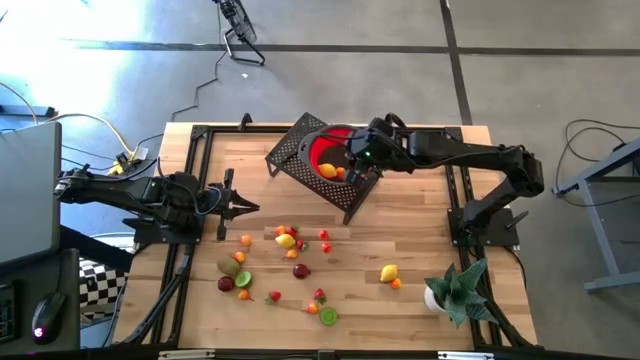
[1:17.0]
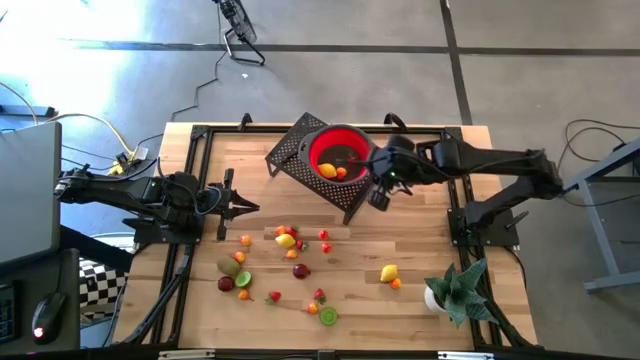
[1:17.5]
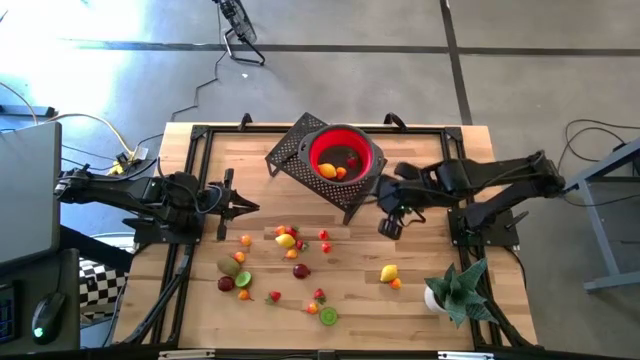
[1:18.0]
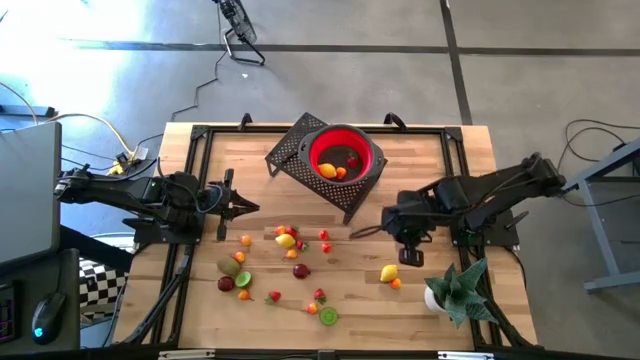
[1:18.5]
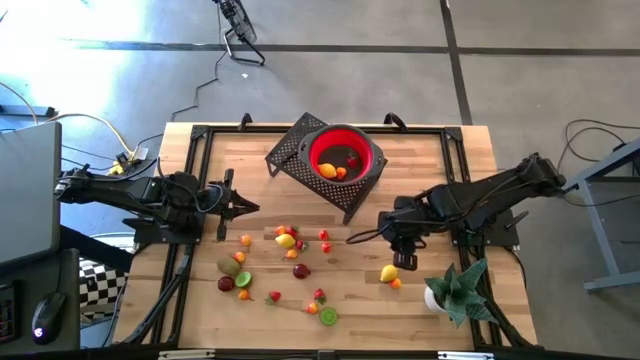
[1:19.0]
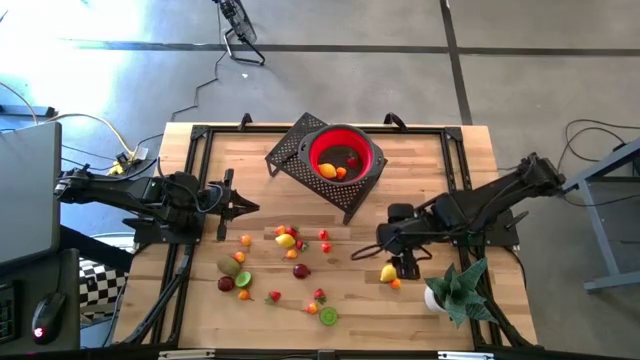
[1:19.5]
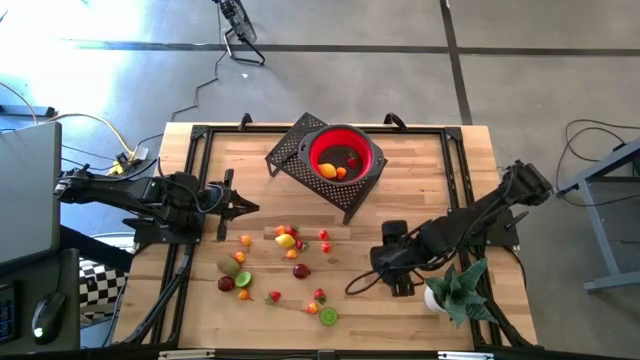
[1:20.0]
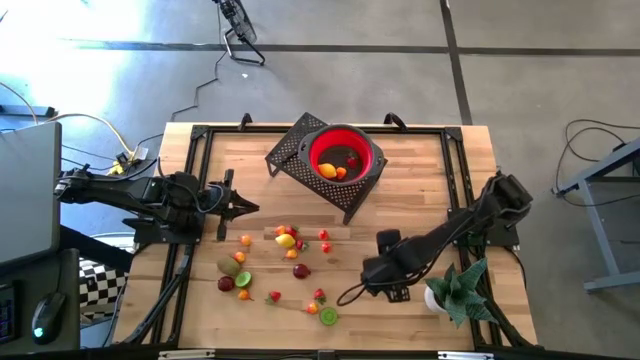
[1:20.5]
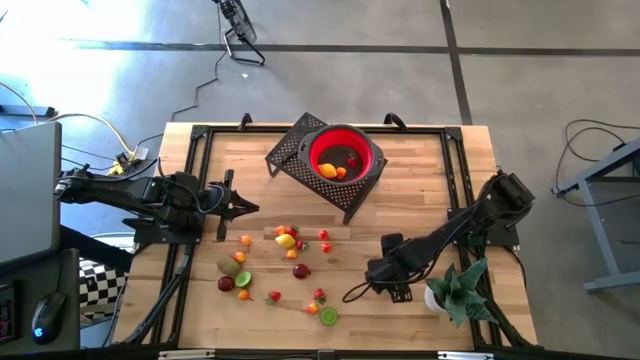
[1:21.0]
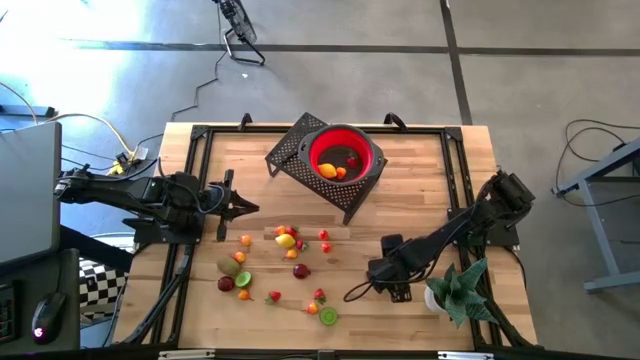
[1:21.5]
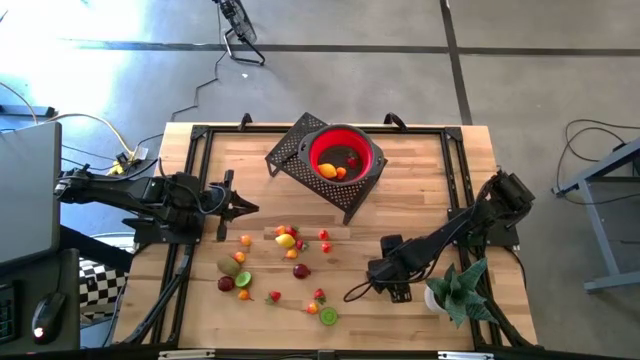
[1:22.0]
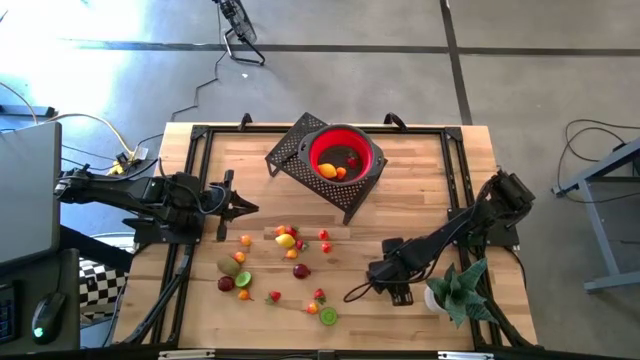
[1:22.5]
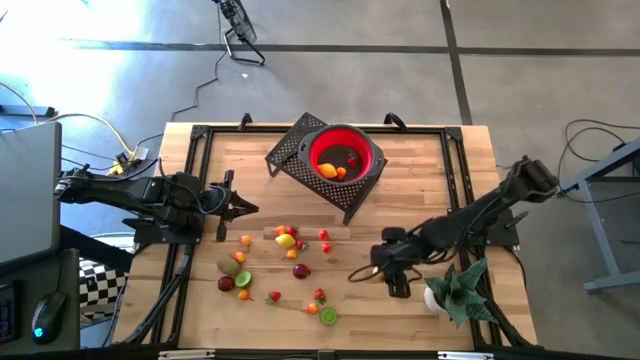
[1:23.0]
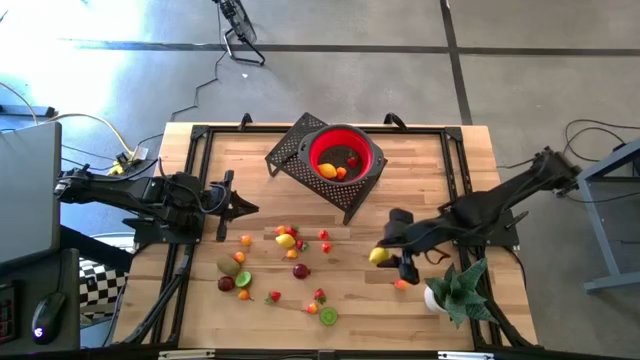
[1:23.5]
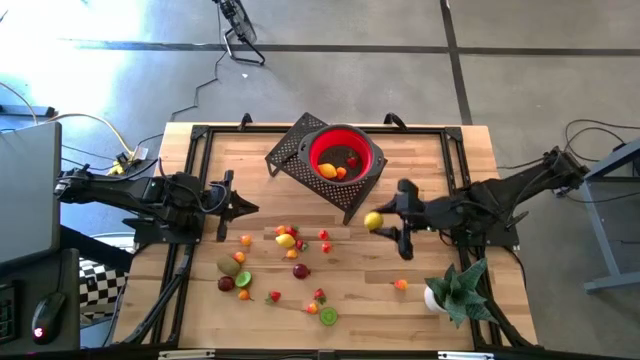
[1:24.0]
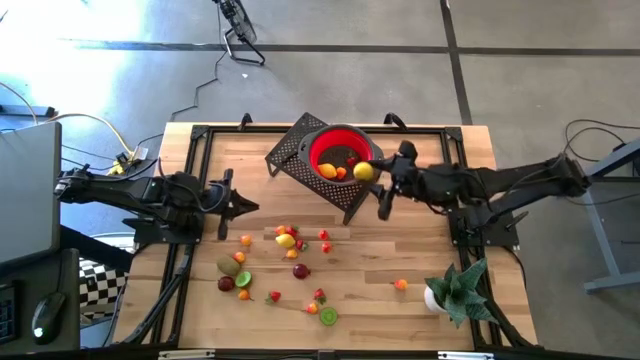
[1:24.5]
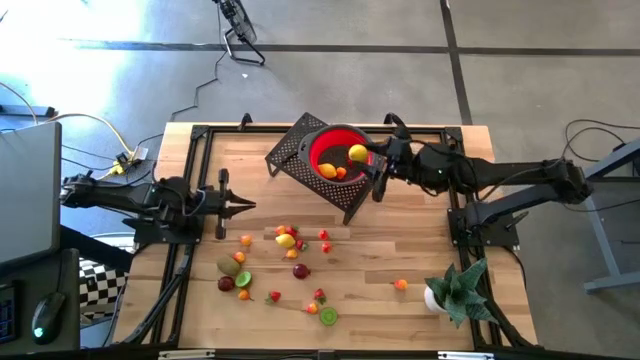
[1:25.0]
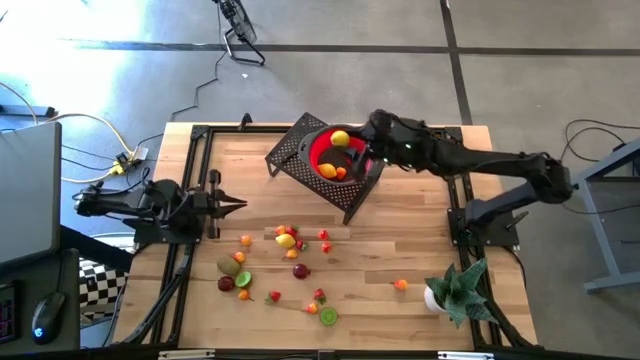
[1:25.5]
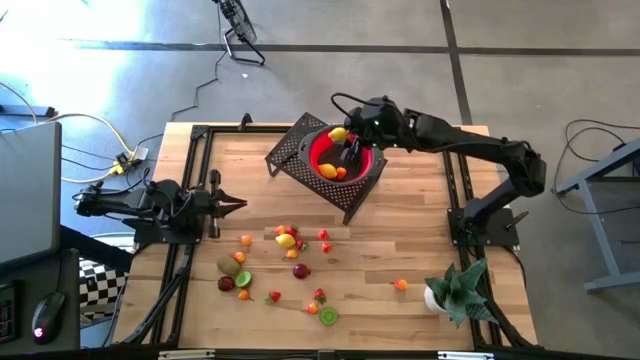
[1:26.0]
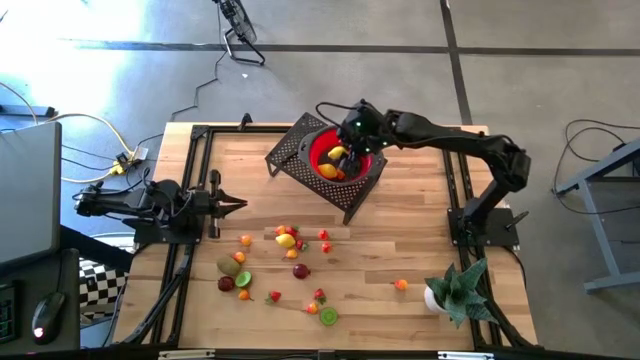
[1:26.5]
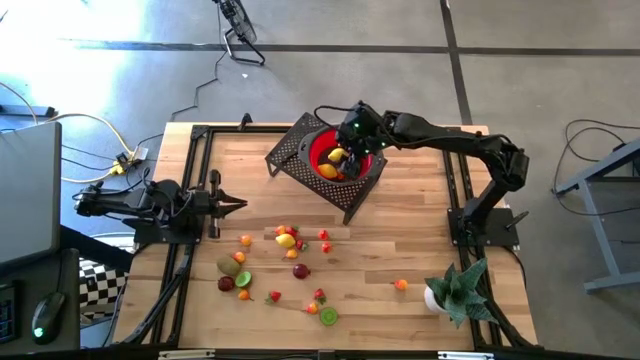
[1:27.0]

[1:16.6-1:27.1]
Task: Pick & Place Fruit
Put the lemon into the strainer bowl on the shelf

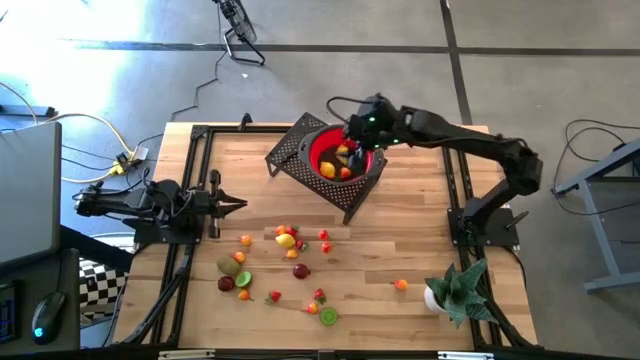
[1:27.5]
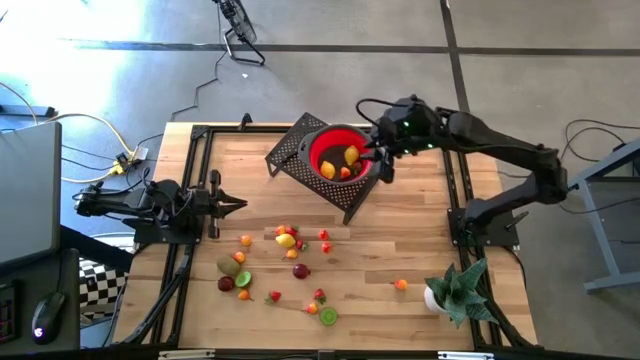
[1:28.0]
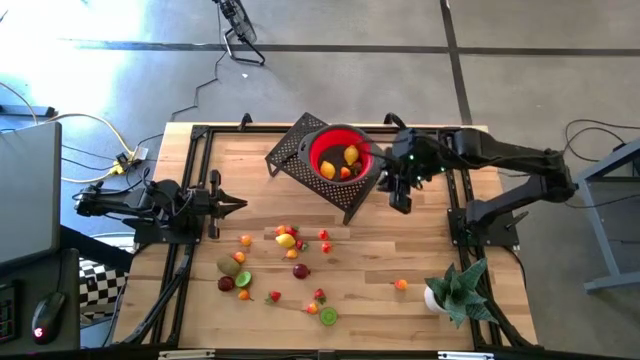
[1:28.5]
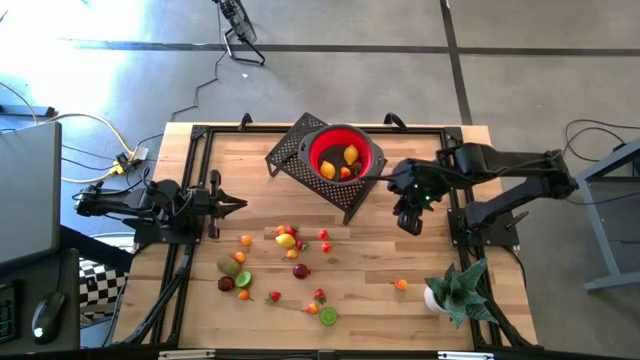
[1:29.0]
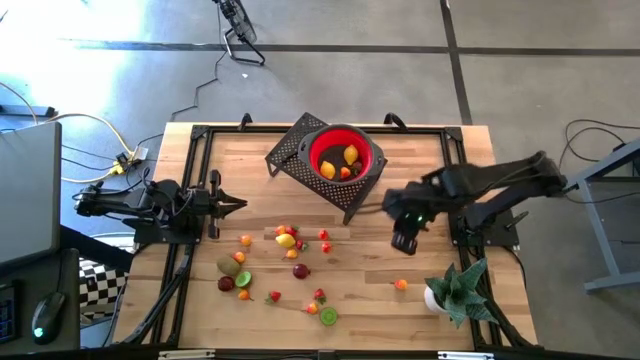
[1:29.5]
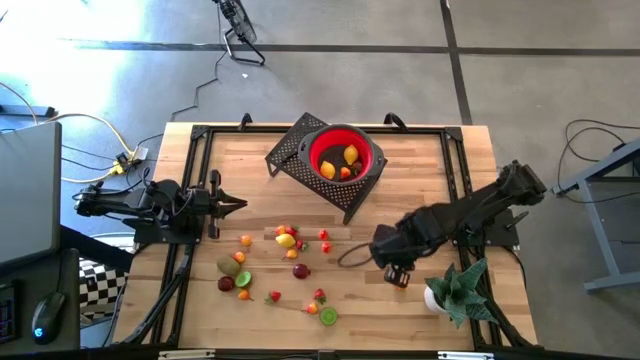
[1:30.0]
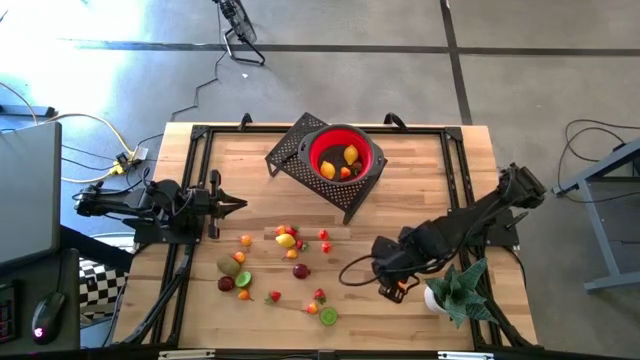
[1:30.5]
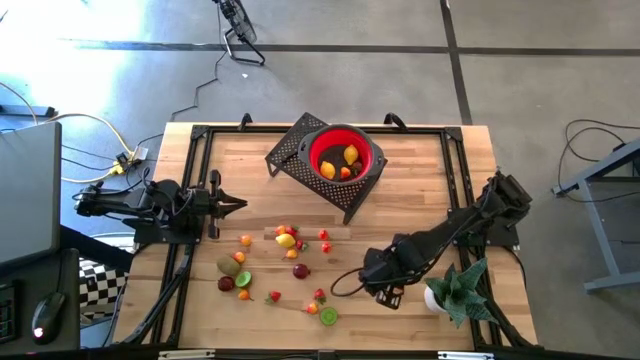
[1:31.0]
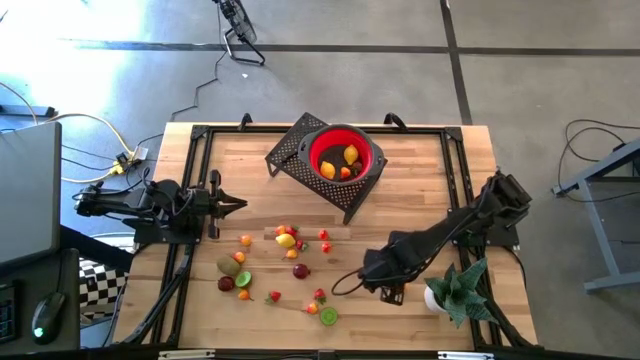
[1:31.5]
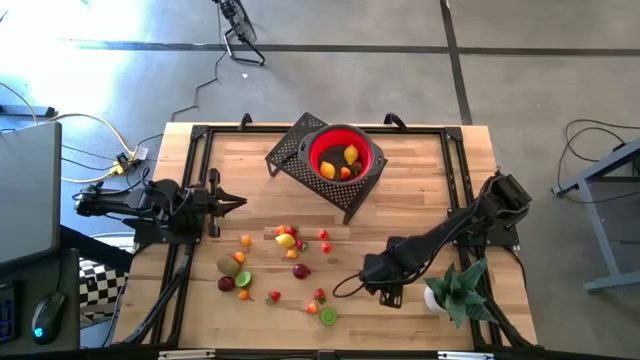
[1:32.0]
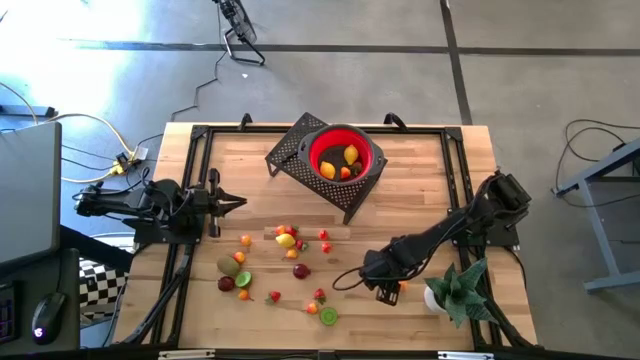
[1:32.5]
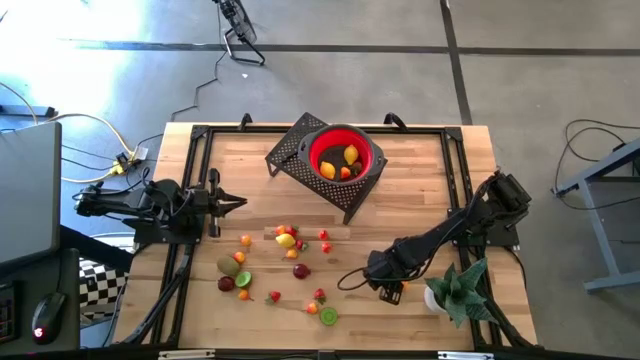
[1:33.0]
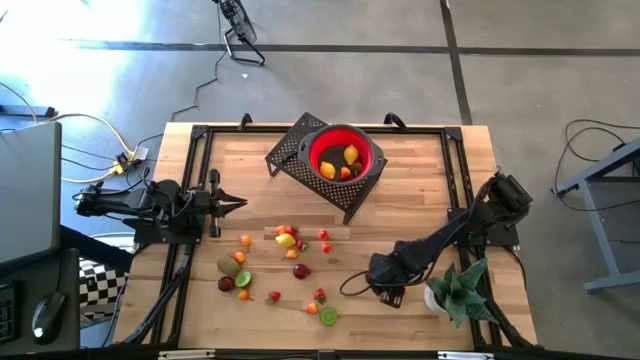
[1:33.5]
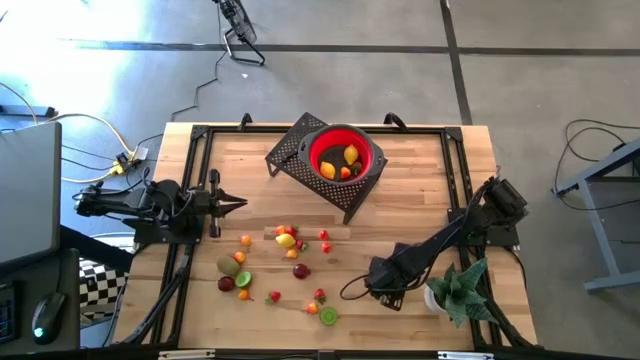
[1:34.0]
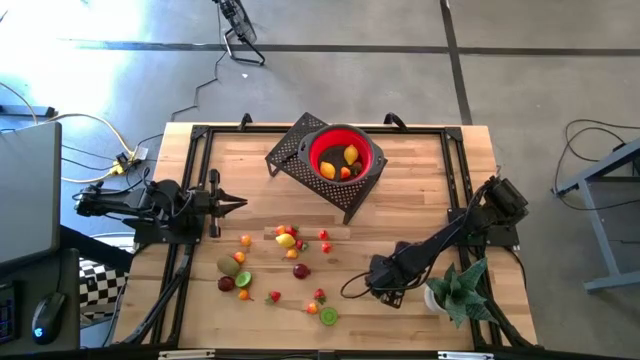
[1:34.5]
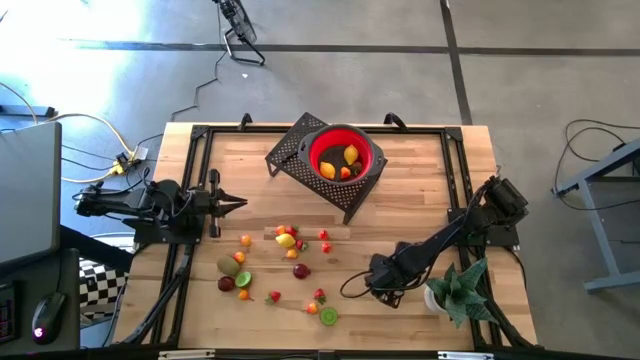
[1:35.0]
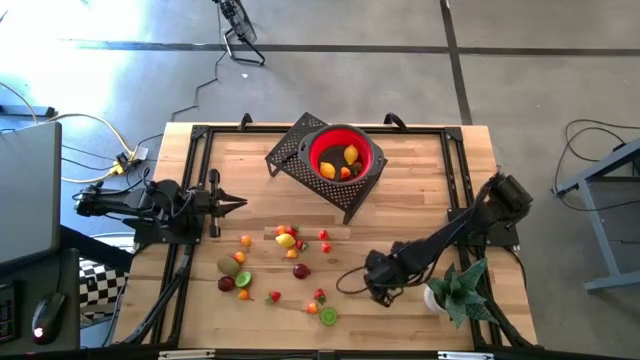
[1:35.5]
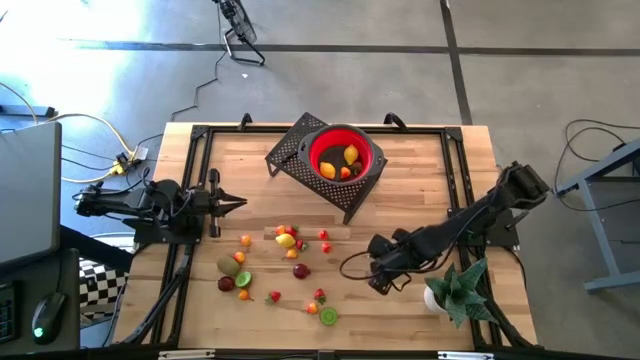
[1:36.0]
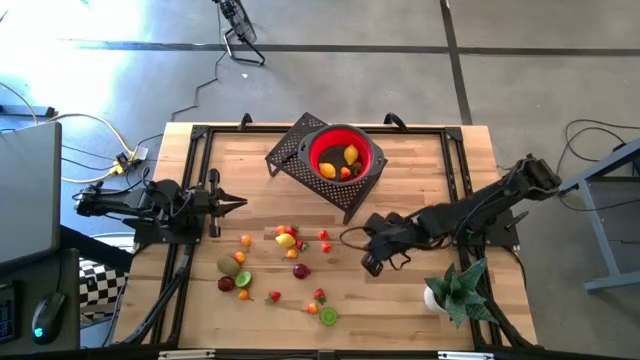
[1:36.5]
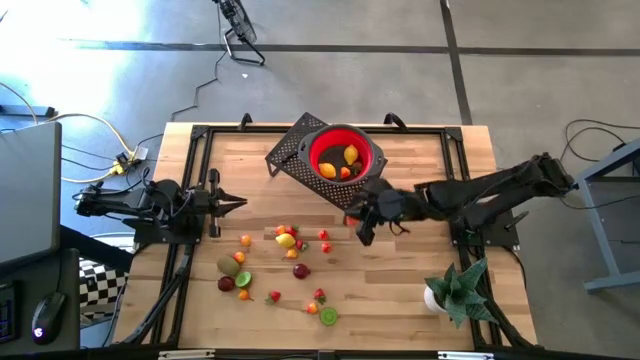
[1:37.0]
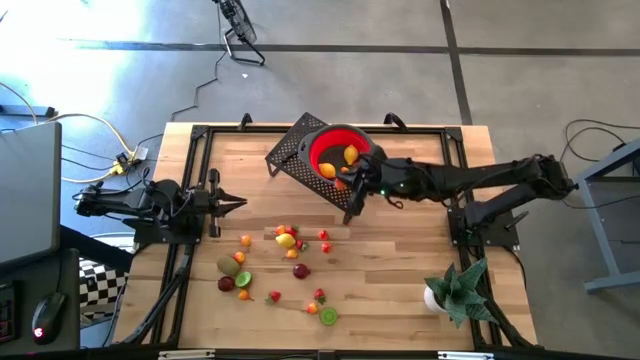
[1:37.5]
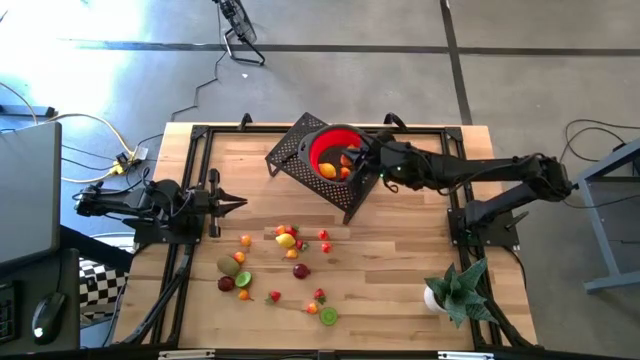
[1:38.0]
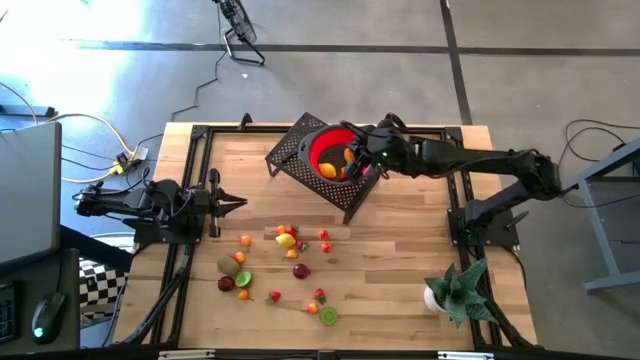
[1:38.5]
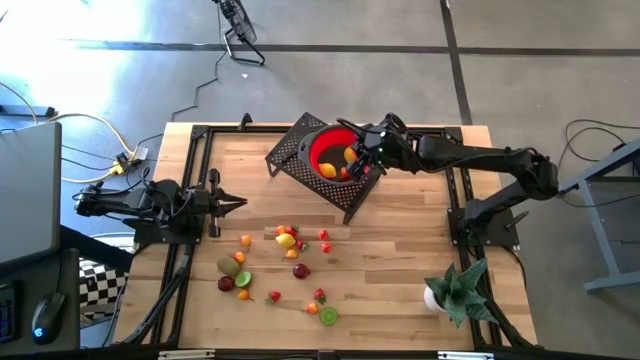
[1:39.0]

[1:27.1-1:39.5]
Put the pear into the strainer bowl on the shelf
